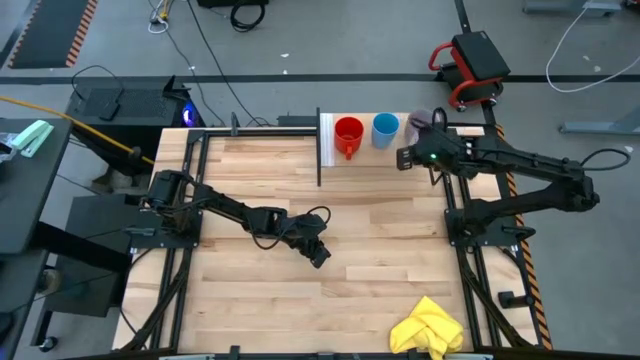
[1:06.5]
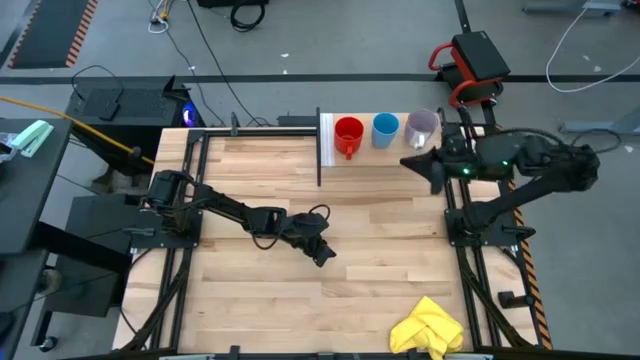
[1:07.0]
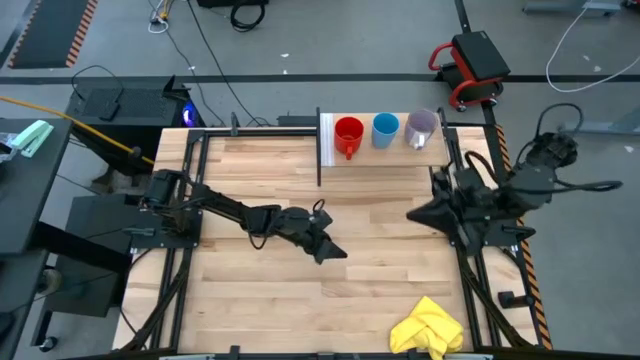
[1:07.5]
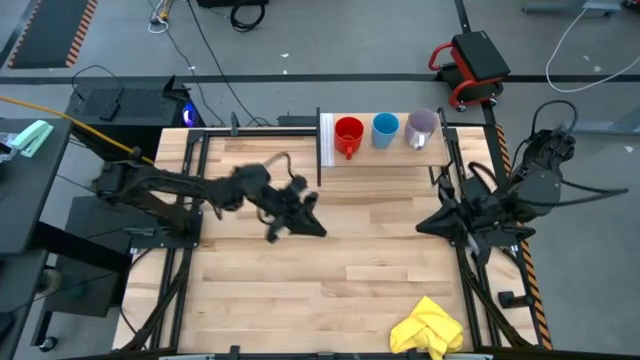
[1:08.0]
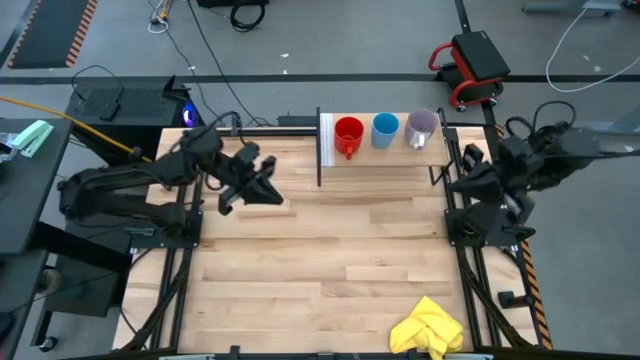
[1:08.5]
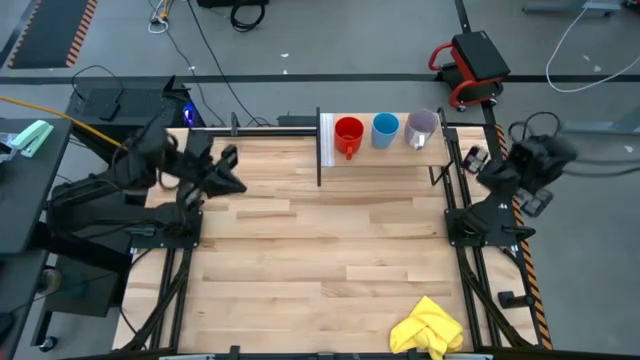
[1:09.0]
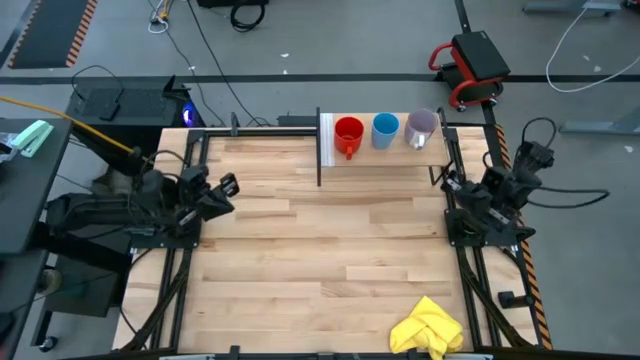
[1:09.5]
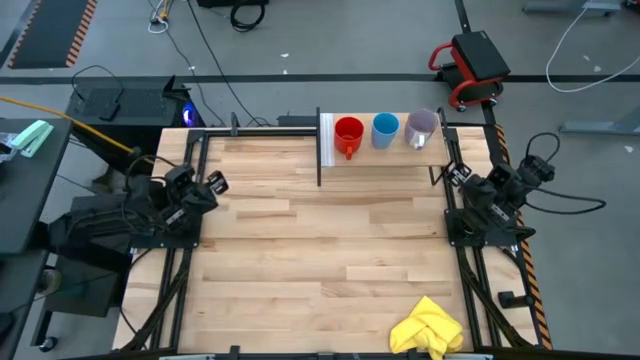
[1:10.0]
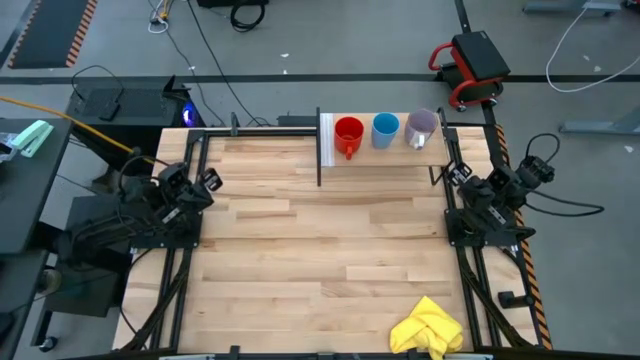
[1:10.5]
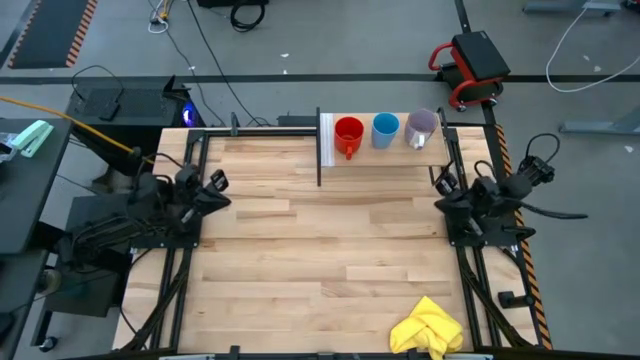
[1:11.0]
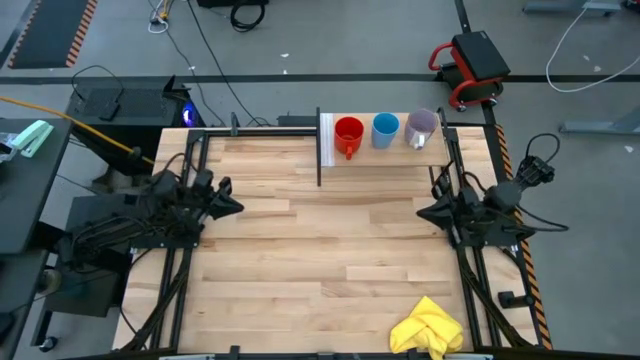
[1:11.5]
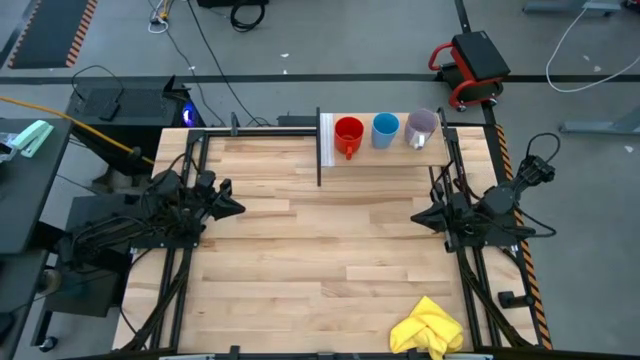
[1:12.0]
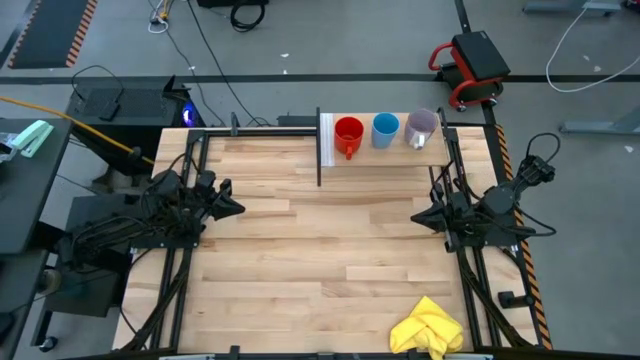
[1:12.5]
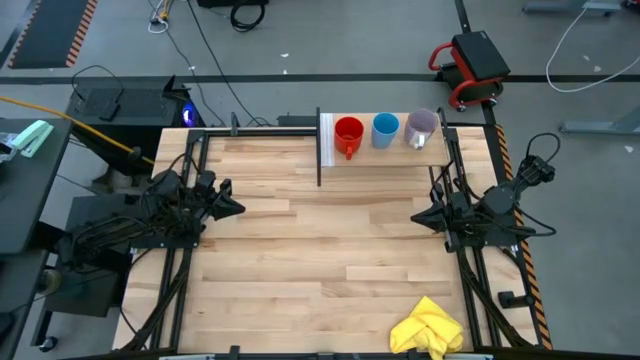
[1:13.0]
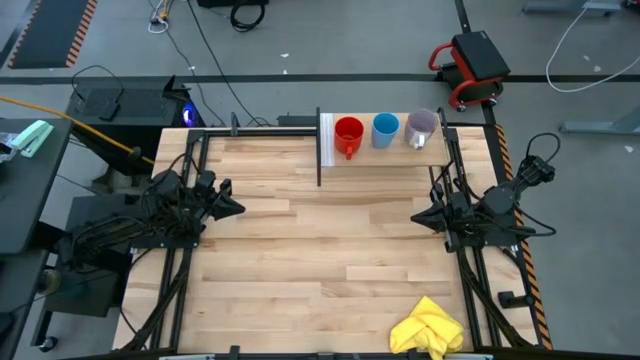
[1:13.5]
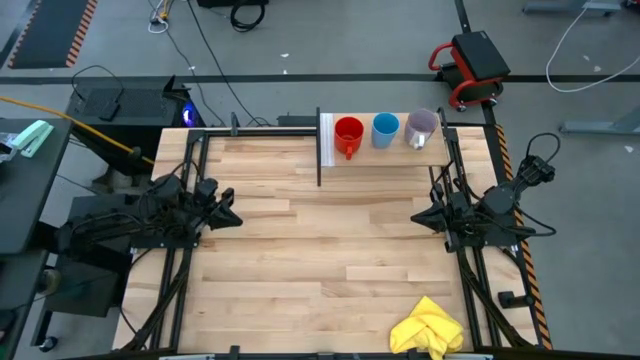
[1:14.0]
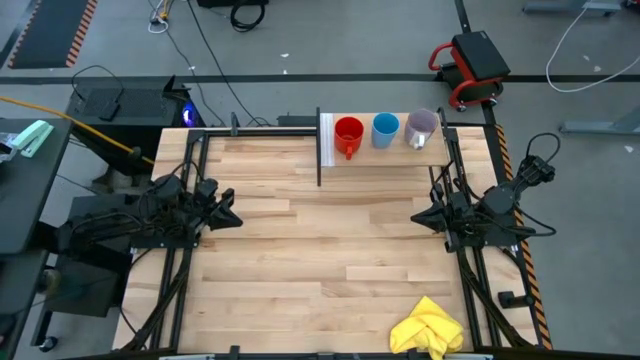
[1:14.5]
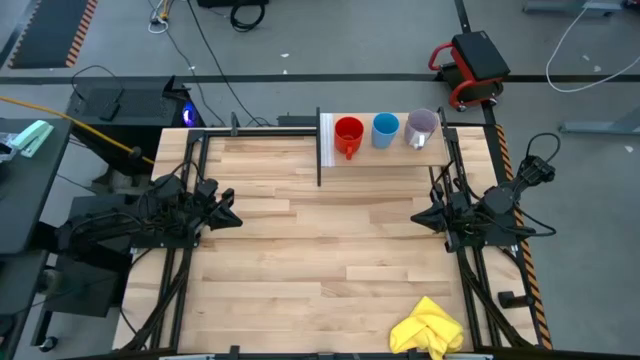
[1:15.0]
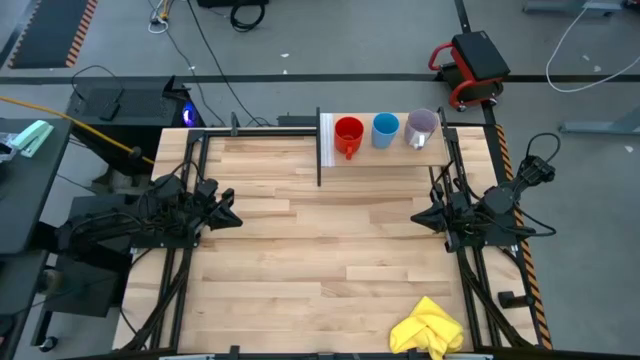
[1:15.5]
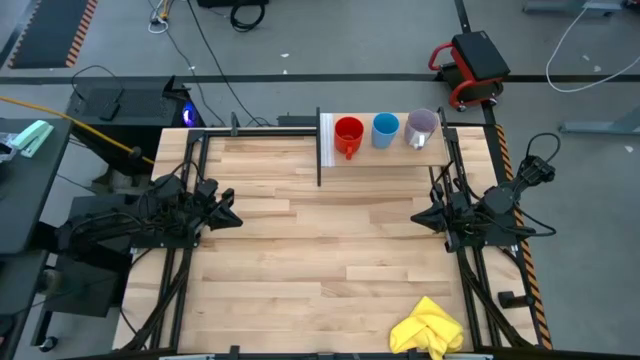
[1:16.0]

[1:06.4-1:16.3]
Task: Stack small to large cups/mugs on shelf
Return to Home Position

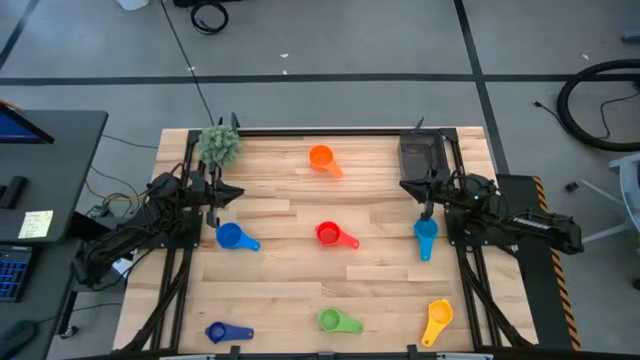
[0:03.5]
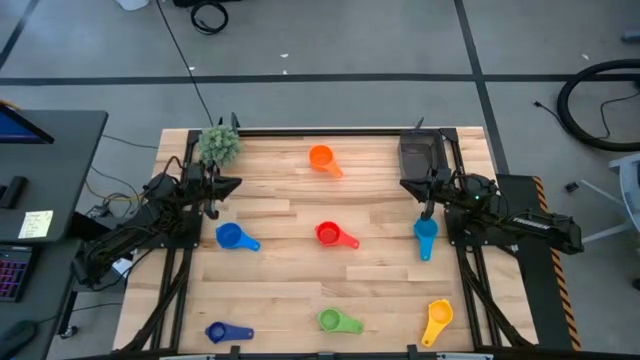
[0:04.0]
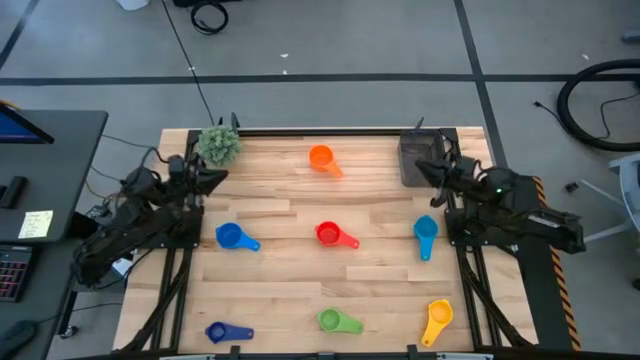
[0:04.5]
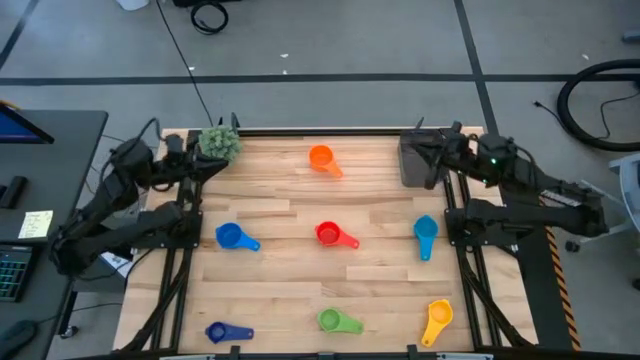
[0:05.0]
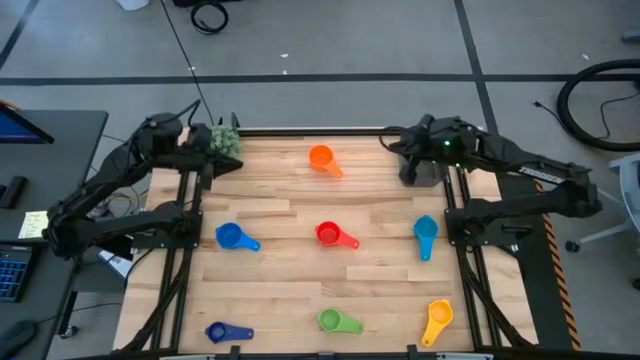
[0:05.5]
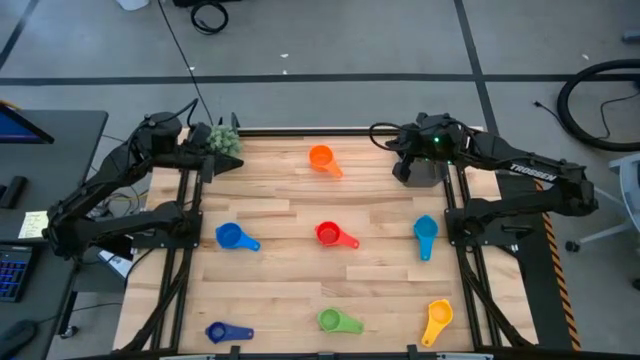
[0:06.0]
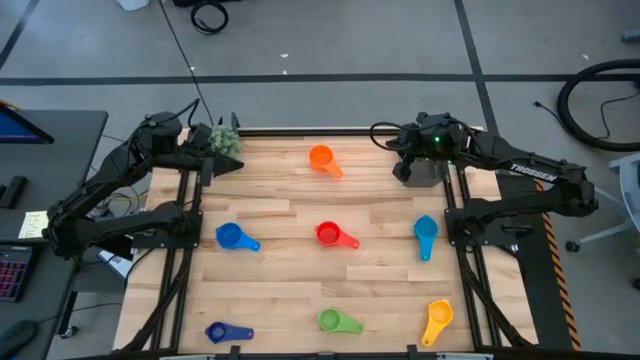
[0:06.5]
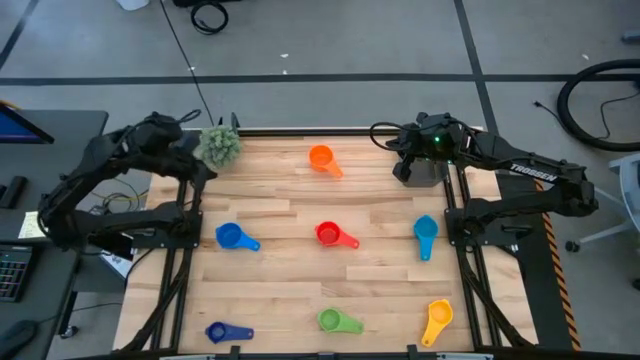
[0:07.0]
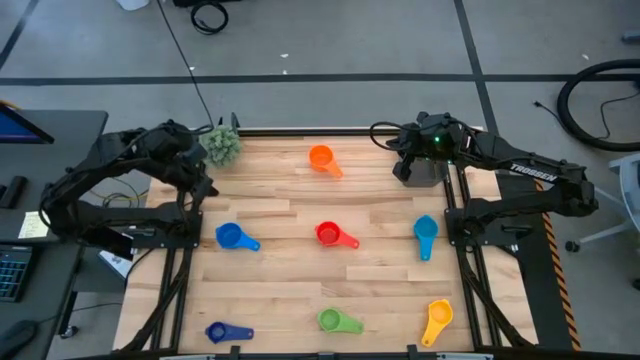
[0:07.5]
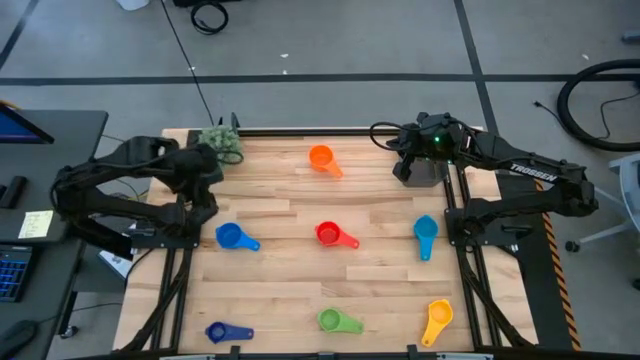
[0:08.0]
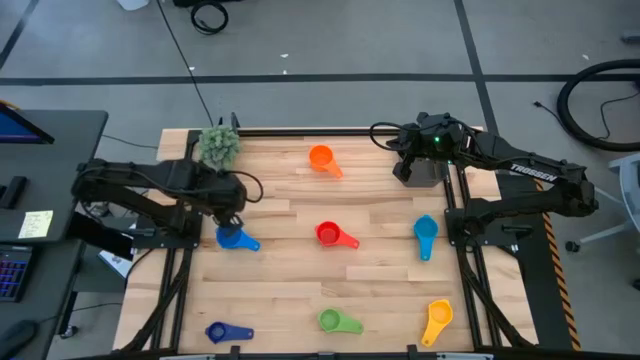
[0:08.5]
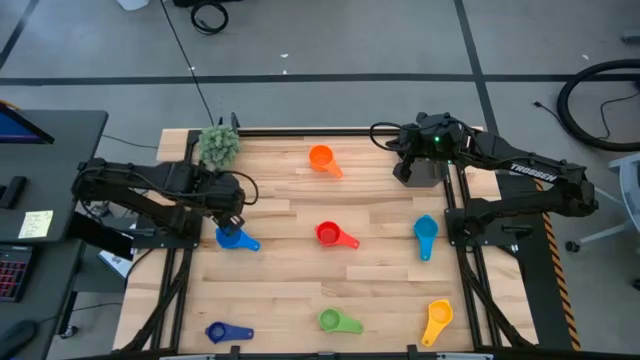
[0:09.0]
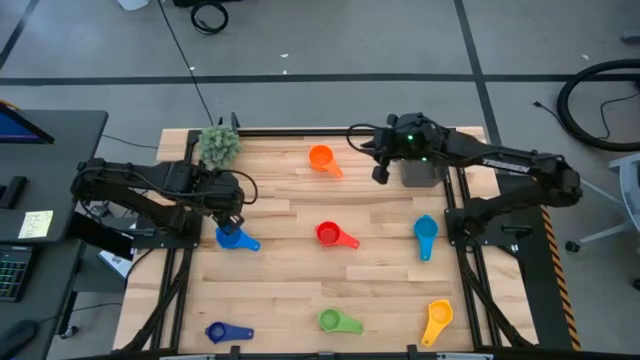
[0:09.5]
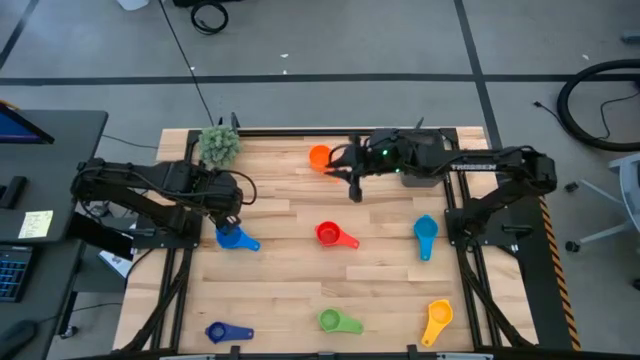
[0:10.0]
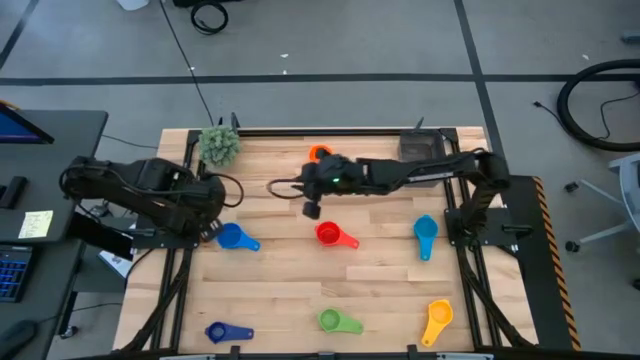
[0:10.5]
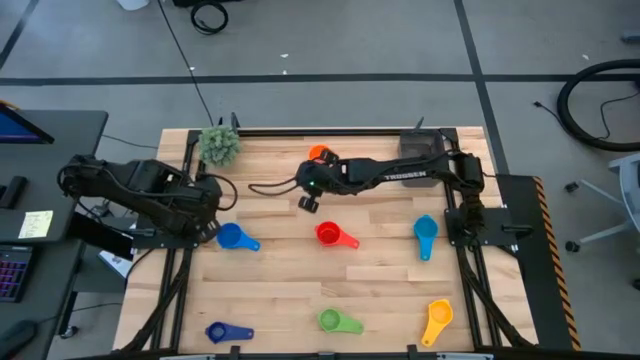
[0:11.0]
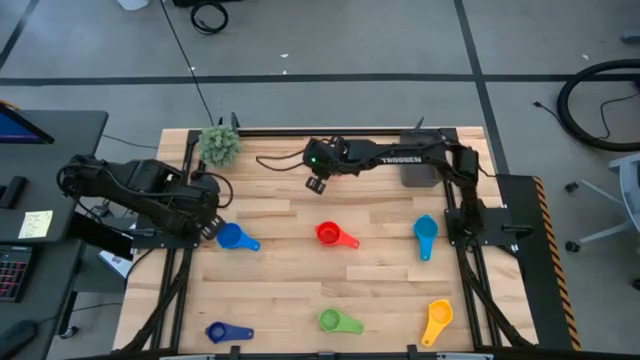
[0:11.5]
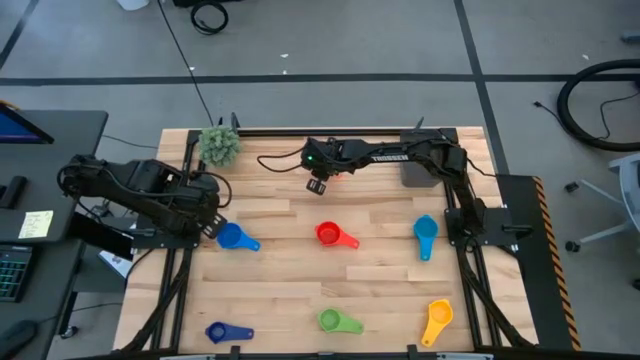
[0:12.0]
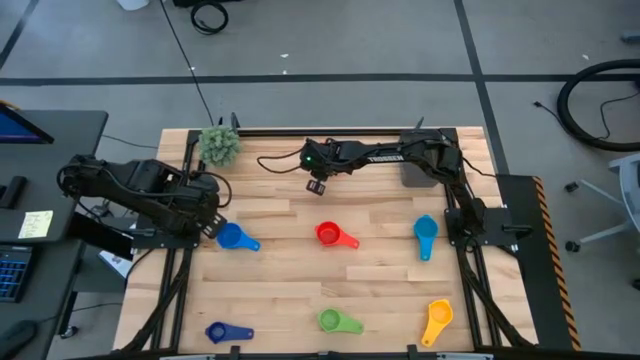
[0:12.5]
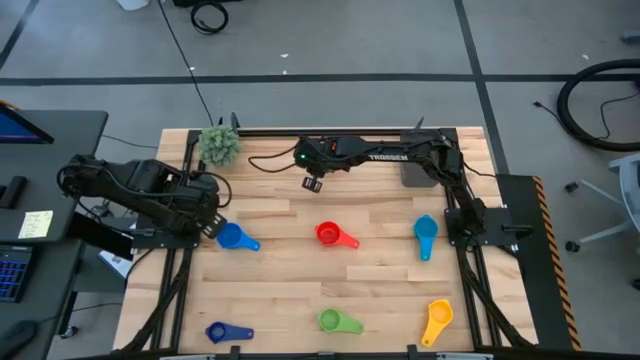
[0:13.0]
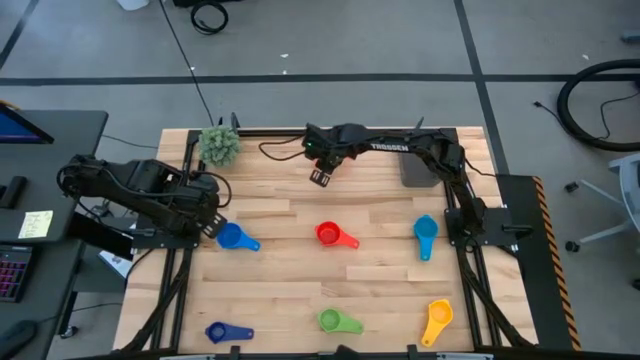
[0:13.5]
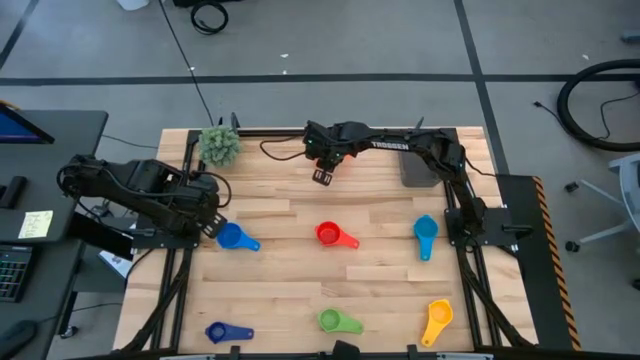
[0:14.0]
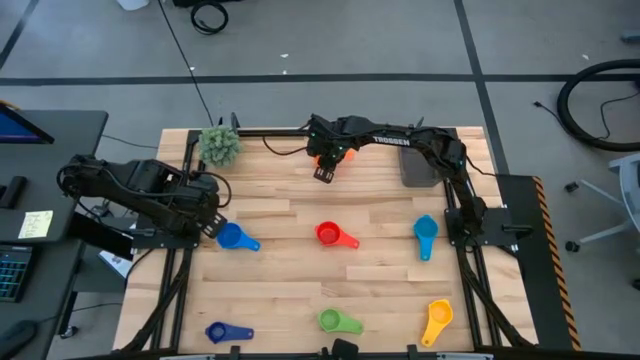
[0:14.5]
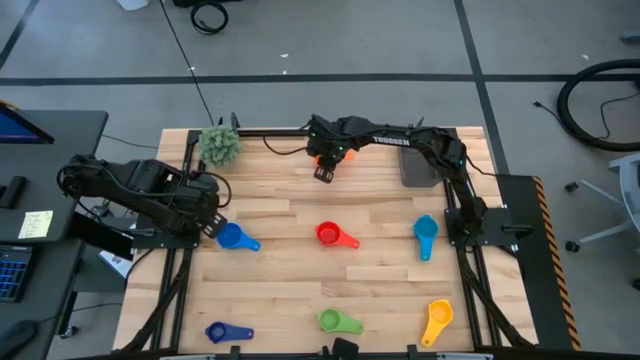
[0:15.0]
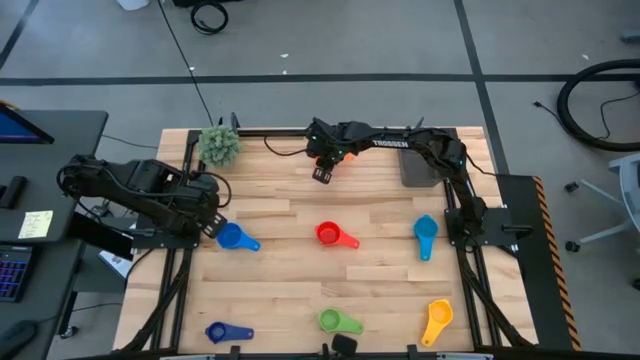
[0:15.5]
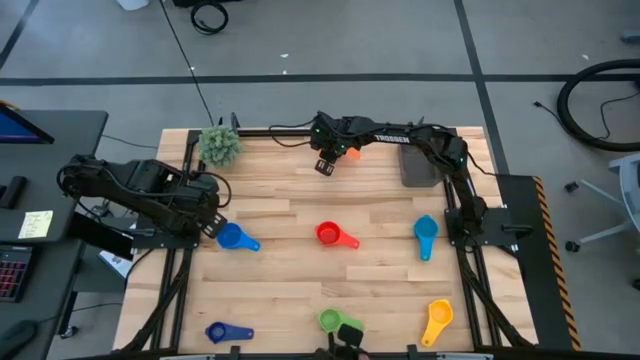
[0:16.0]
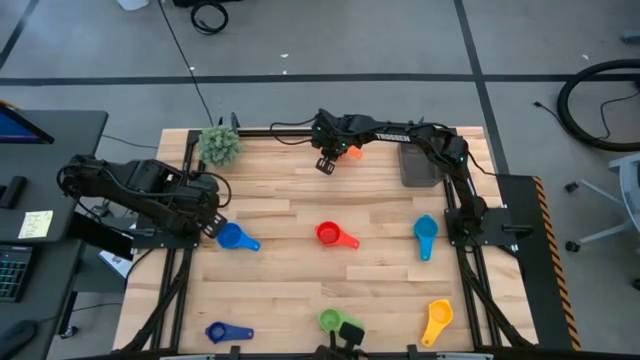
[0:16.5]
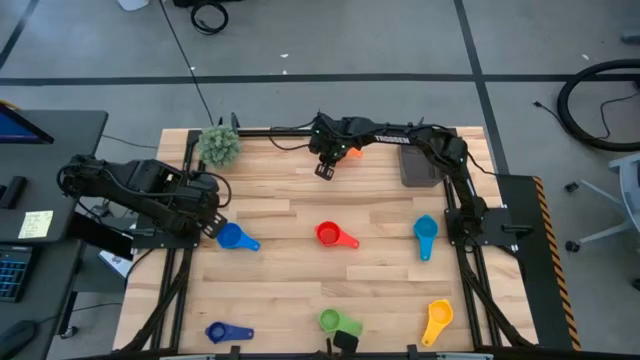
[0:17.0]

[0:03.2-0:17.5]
Task: Nest measuring cups in basket
Prepare the orange measuring cup
